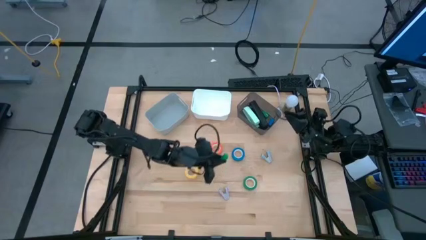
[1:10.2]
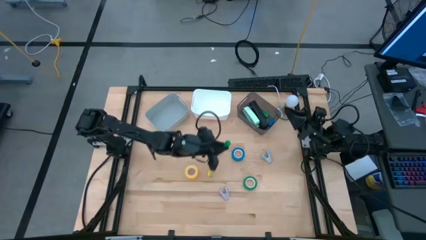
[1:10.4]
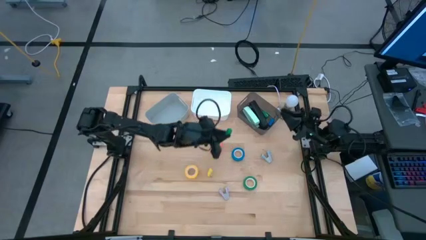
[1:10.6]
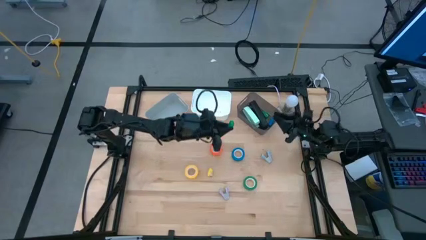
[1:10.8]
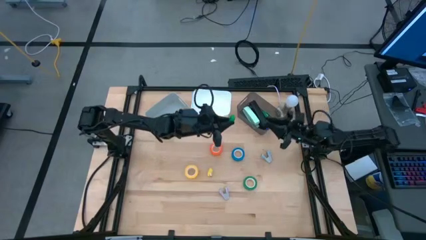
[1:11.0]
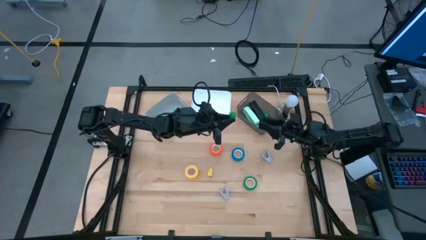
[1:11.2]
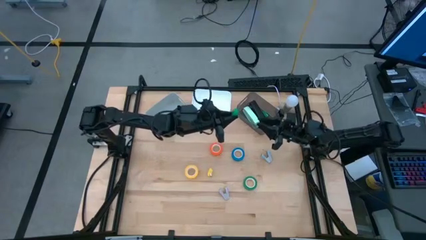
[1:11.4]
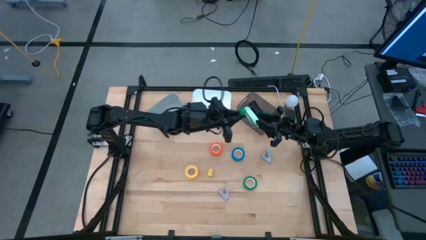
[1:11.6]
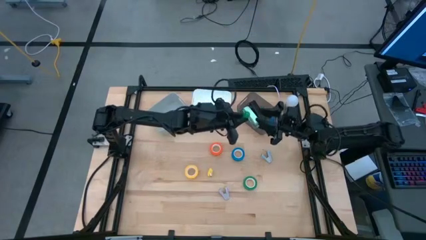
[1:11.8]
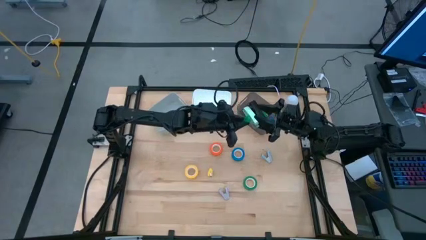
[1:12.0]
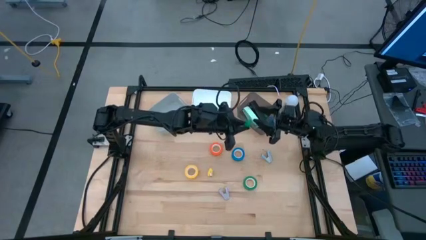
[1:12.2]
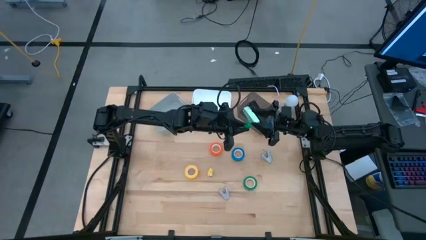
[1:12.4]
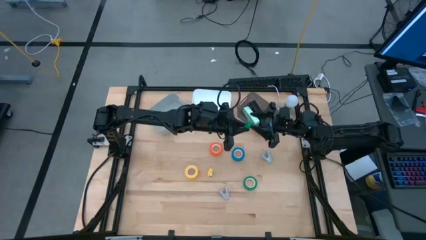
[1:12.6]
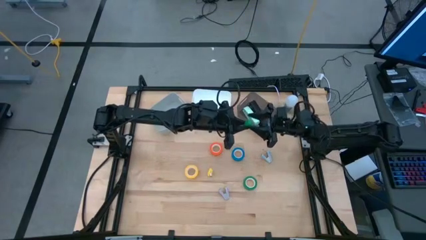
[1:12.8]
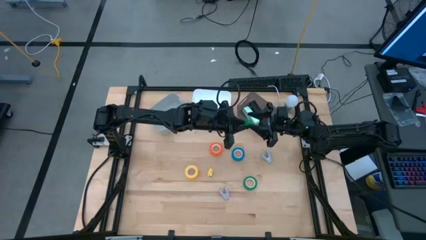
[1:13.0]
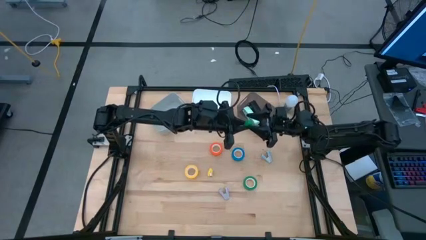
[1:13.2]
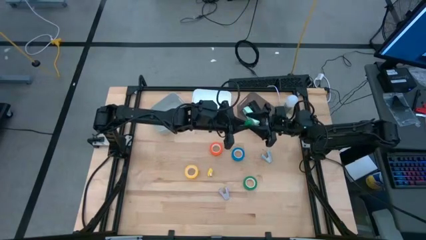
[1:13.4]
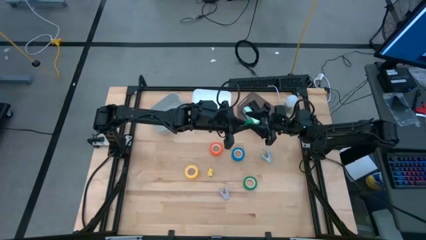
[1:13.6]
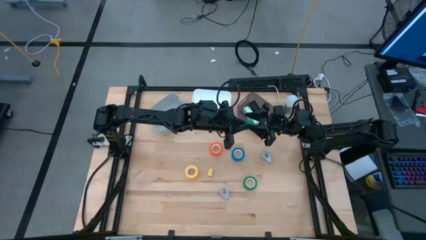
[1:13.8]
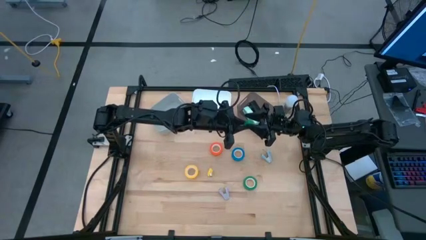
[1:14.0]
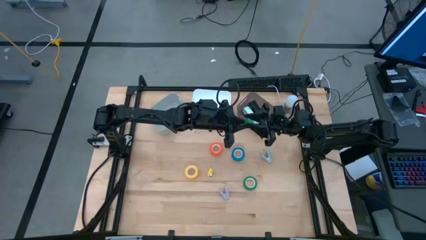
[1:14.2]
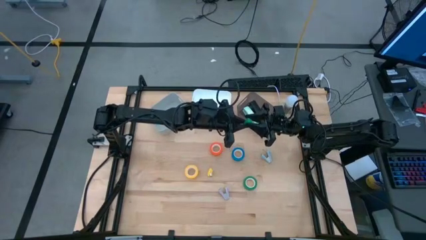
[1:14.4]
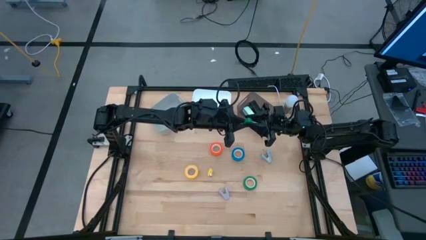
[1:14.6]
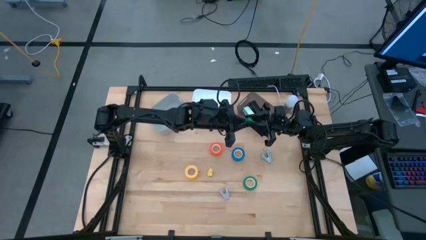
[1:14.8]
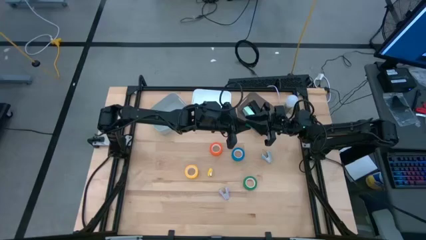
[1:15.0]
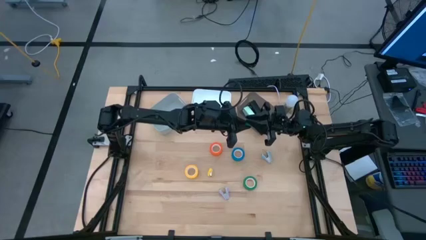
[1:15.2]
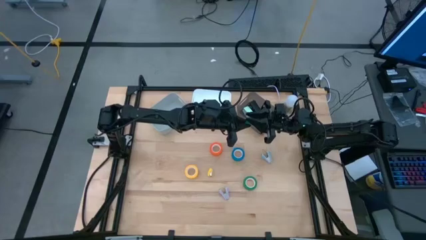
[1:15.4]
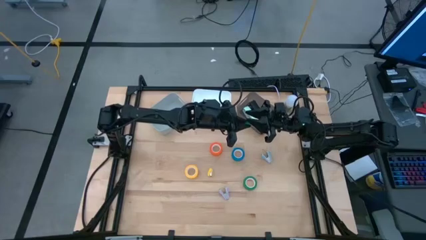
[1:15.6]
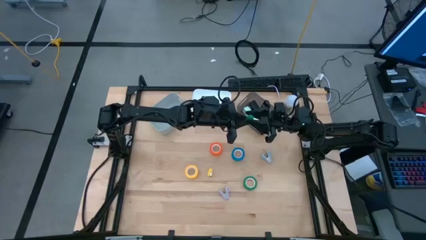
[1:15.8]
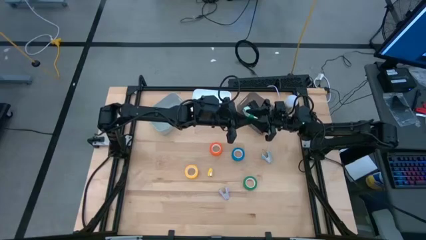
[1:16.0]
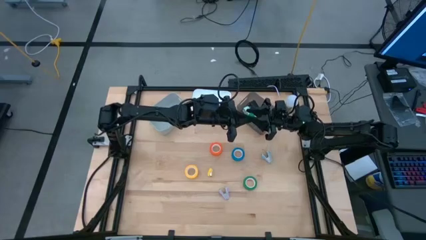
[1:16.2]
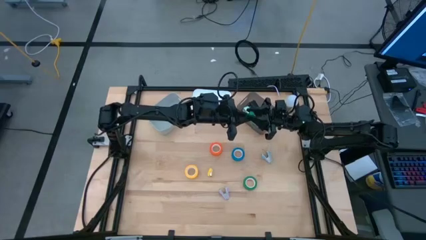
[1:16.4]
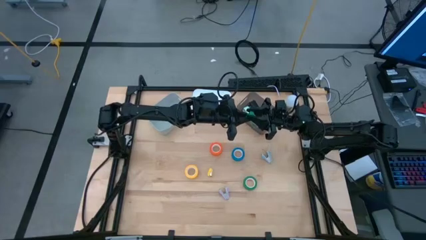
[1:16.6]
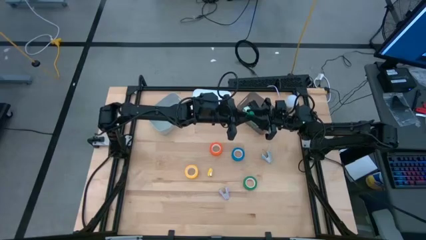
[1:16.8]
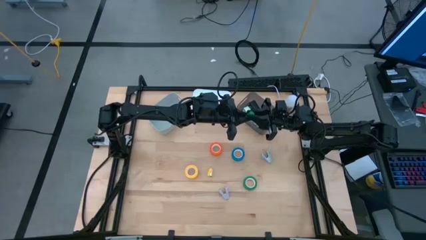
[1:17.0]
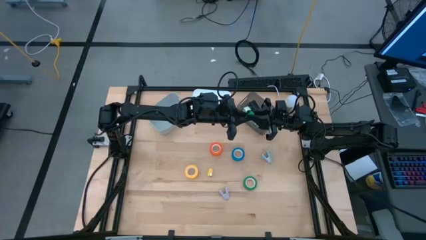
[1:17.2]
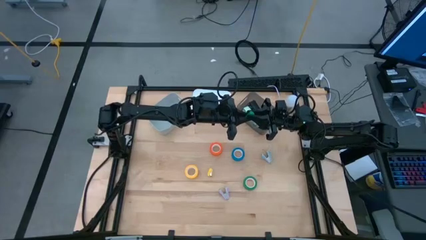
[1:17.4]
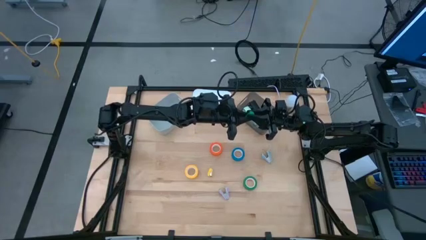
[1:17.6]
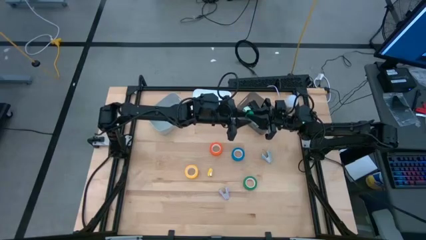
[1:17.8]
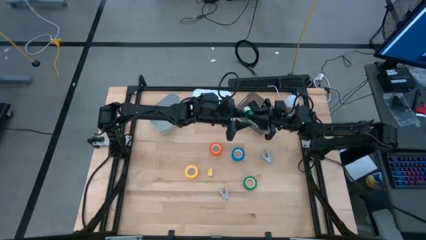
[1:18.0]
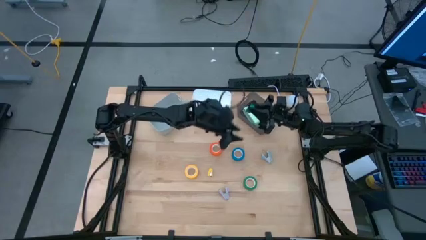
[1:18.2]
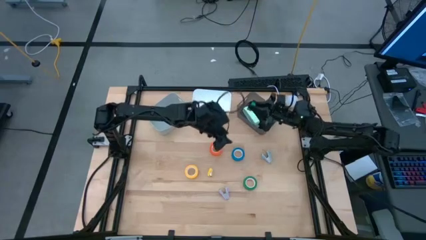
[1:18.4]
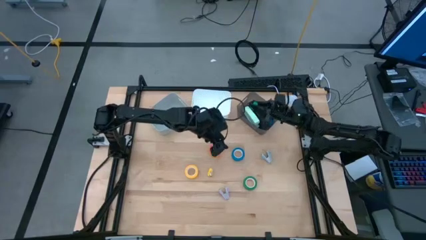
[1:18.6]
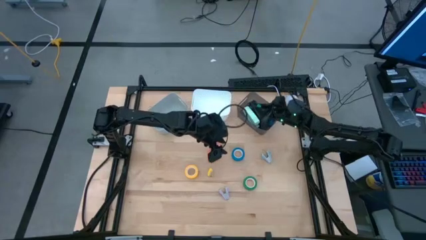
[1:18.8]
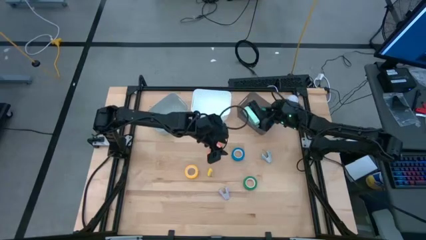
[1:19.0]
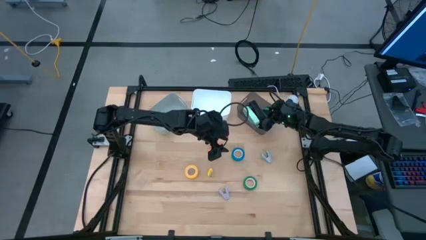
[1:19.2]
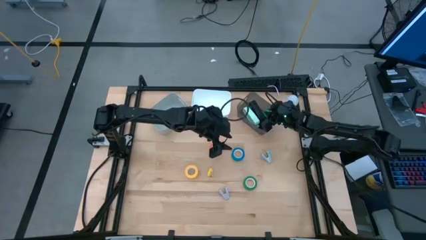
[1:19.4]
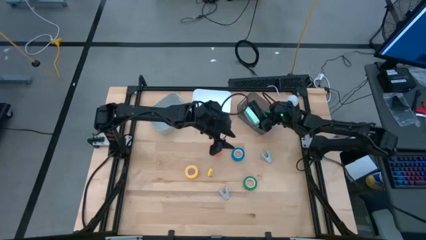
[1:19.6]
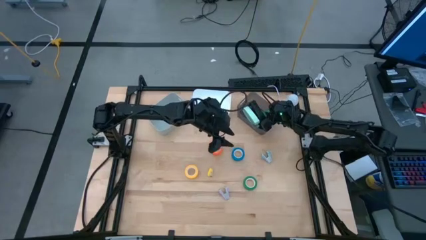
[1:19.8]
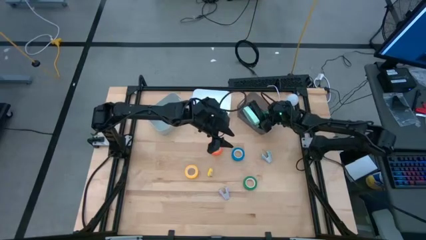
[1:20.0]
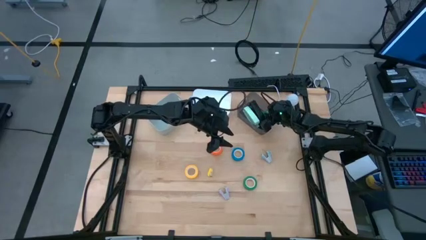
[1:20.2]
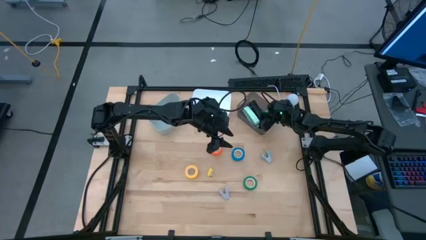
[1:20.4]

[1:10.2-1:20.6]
Task: Pick and place Stapler, Stapler remover, tape
Put the small green stapler into the black bin
